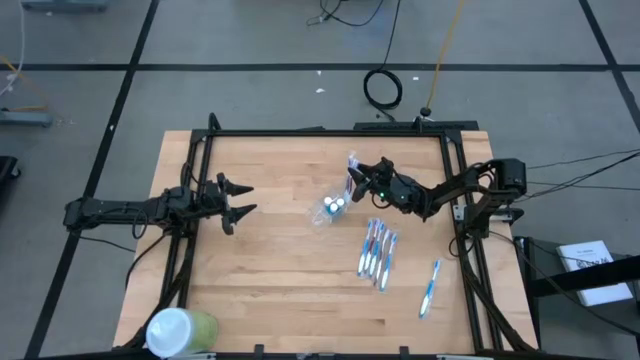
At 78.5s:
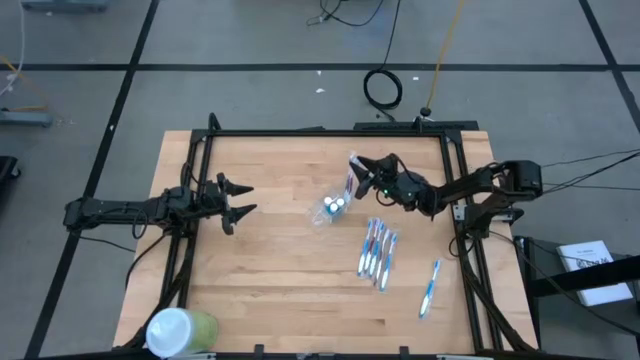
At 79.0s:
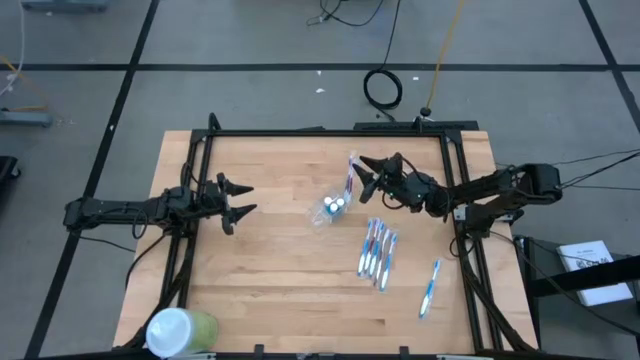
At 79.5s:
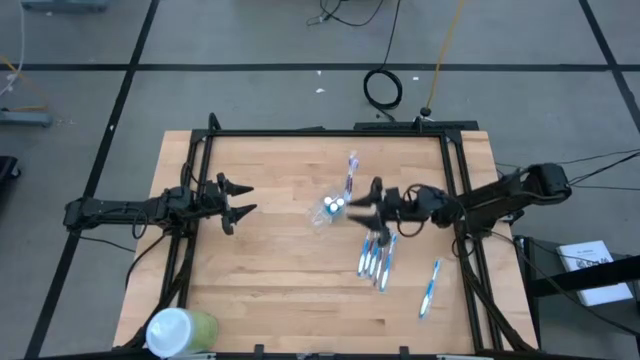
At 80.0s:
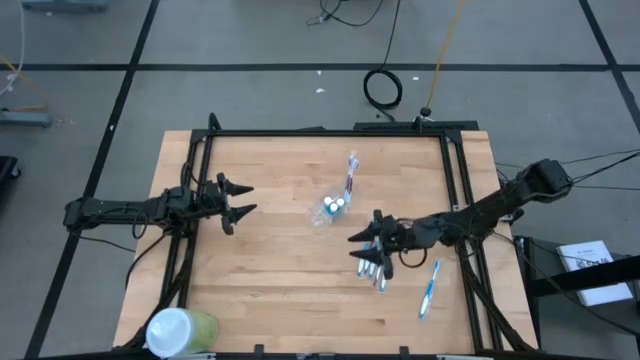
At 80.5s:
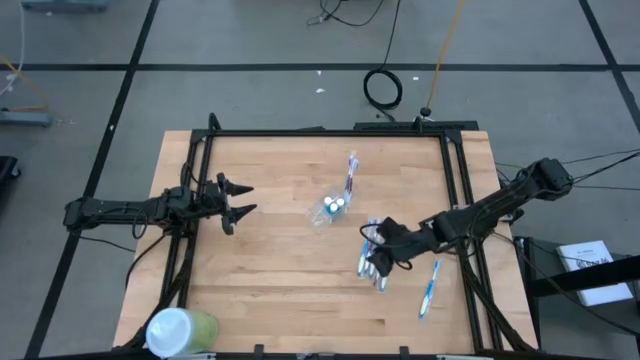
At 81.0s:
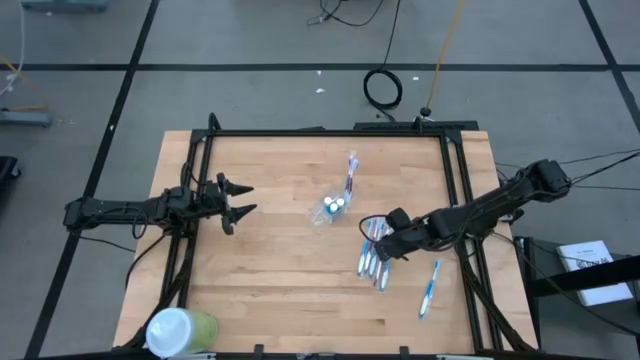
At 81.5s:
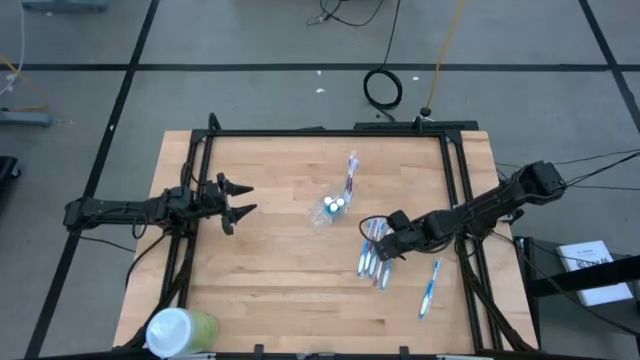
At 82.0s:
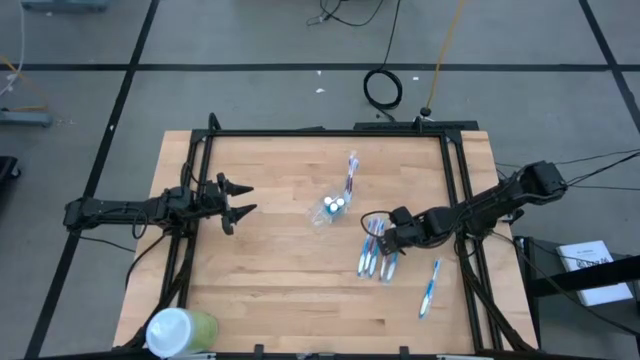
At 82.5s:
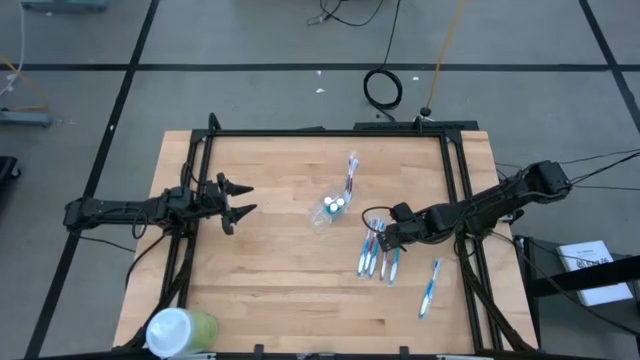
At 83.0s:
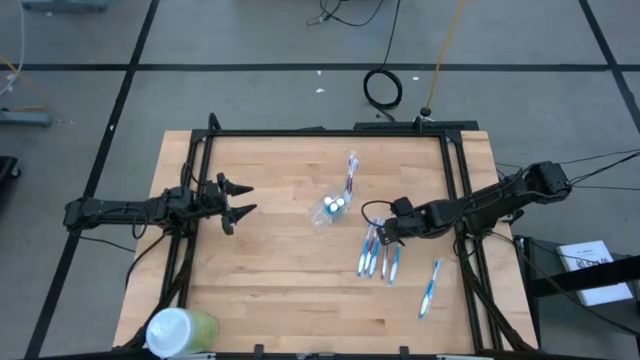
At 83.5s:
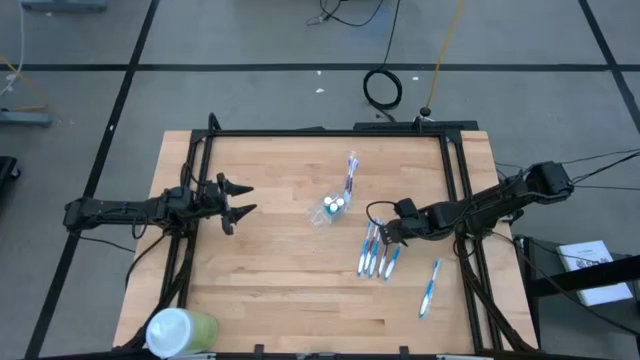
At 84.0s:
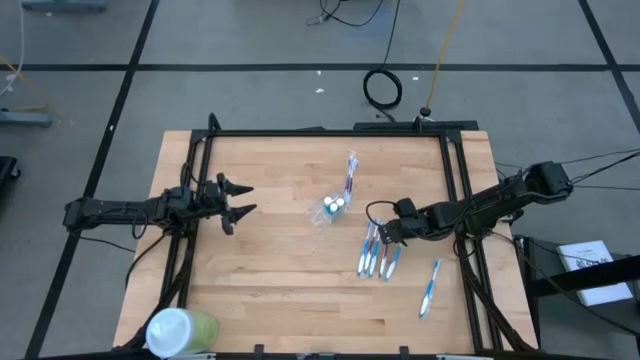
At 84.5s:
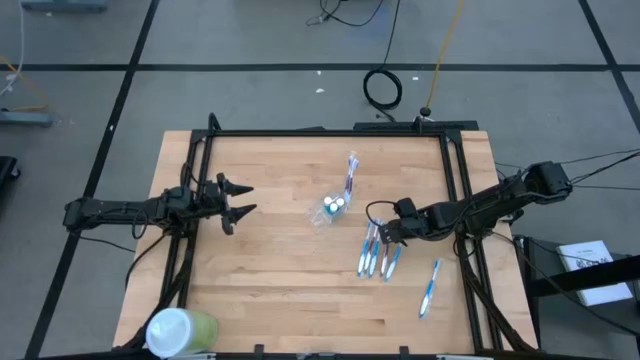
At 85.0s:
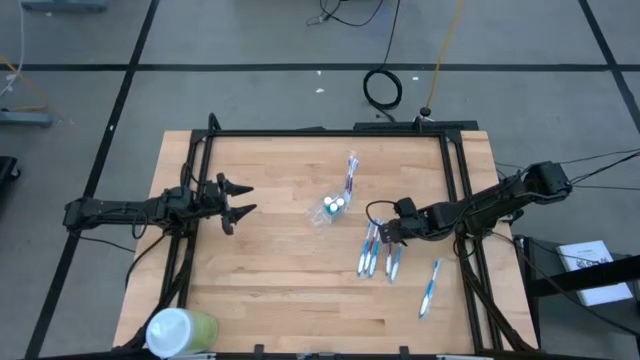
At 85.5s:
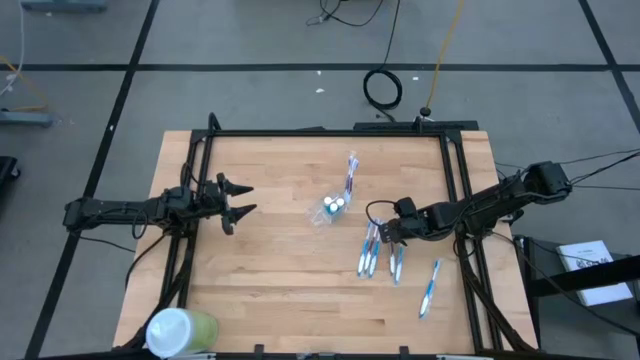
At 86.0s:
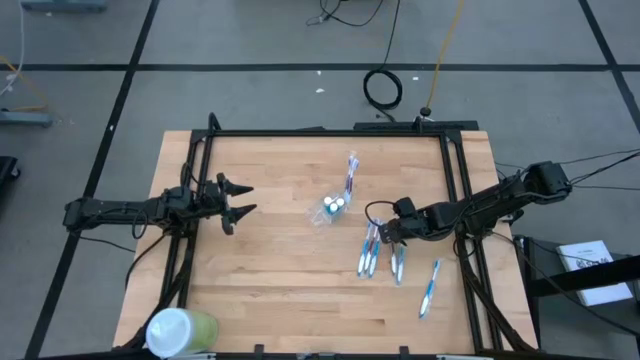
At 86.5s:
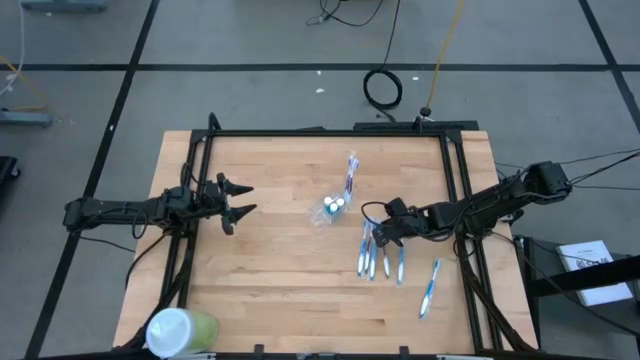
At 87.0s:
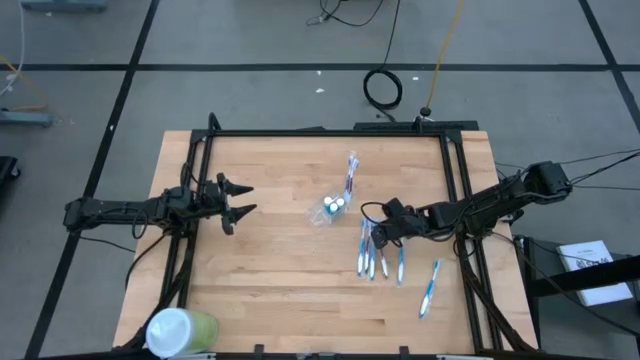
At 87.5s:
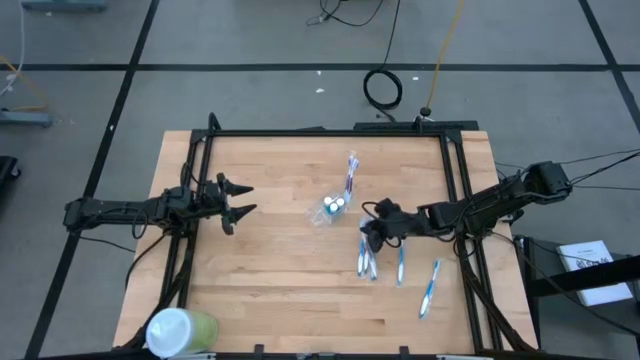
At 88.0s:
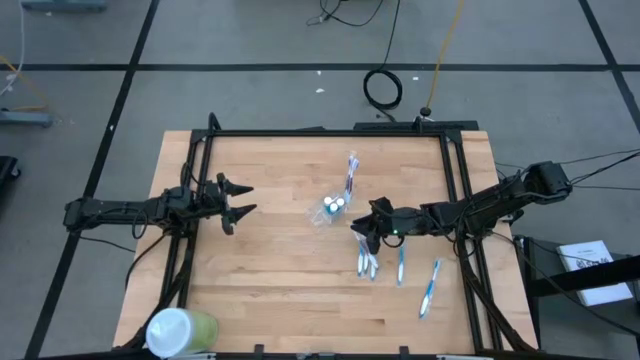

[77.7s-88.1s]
Task: Pick & Place toothbrushing station
Put the purple toothbrush into the transparent organizer

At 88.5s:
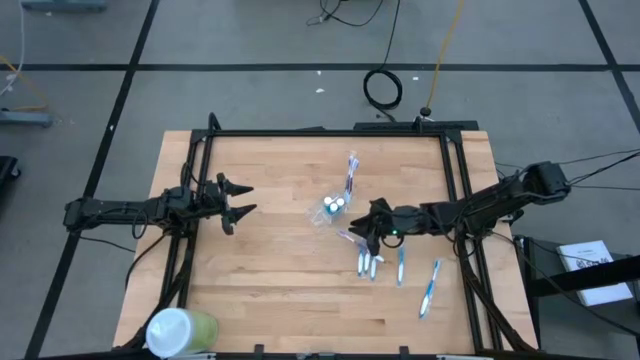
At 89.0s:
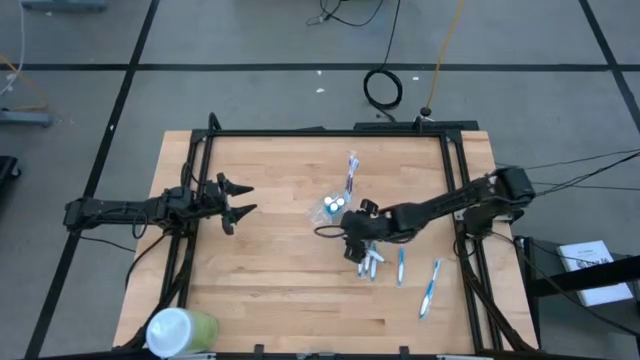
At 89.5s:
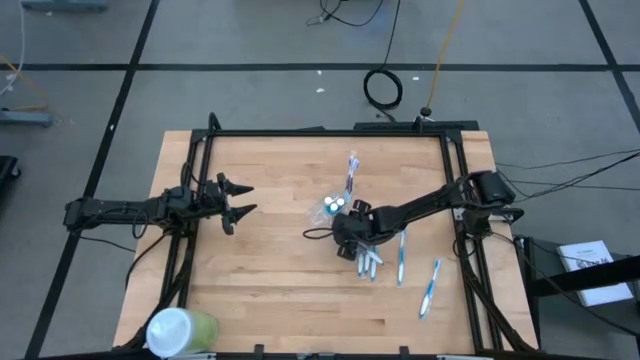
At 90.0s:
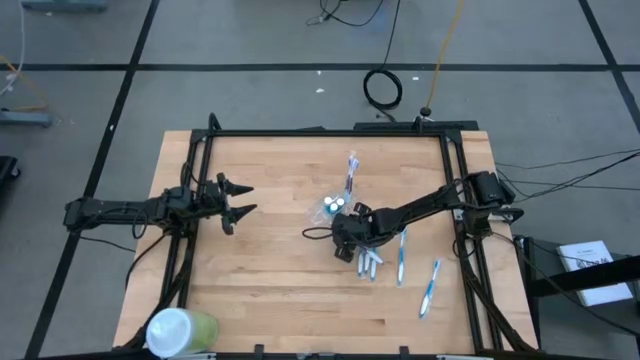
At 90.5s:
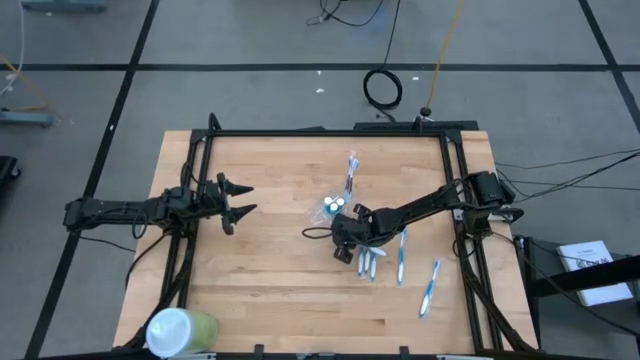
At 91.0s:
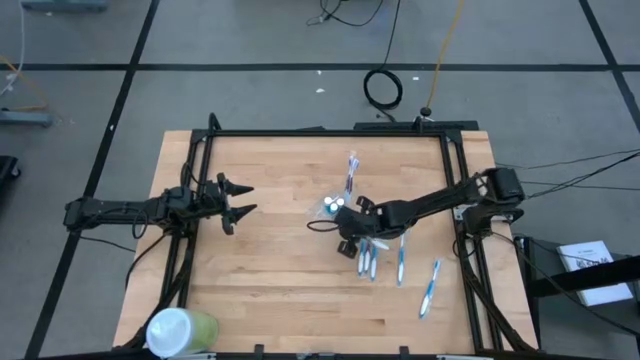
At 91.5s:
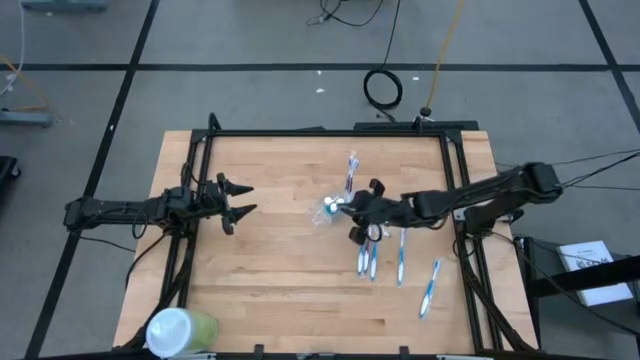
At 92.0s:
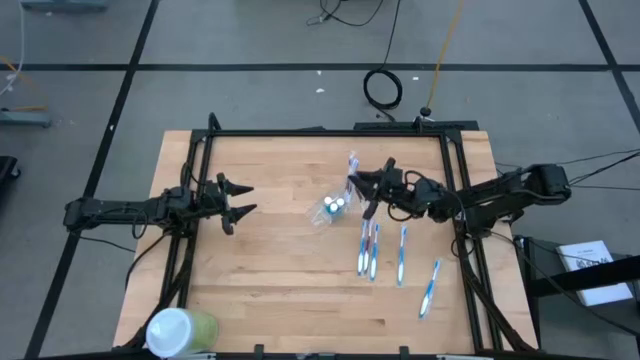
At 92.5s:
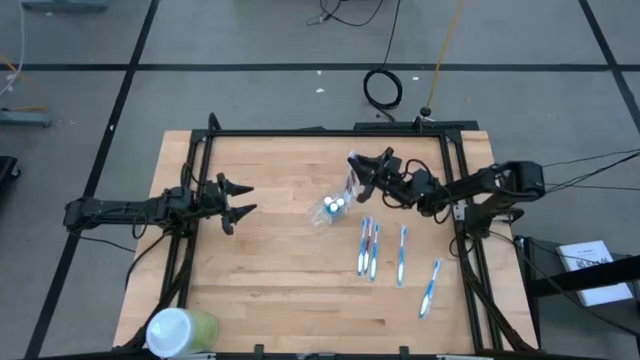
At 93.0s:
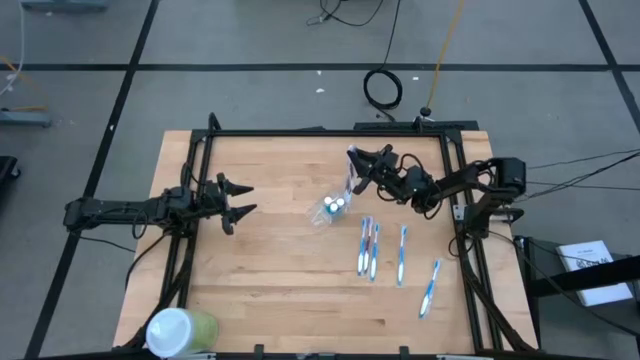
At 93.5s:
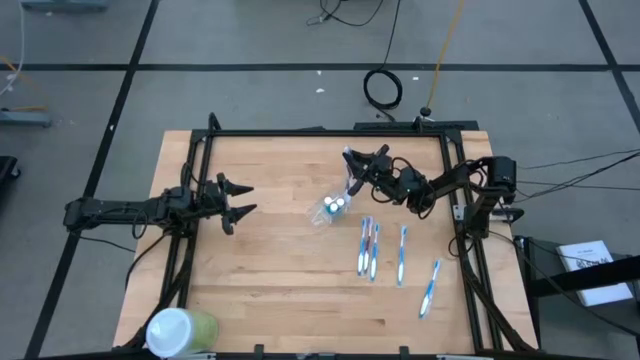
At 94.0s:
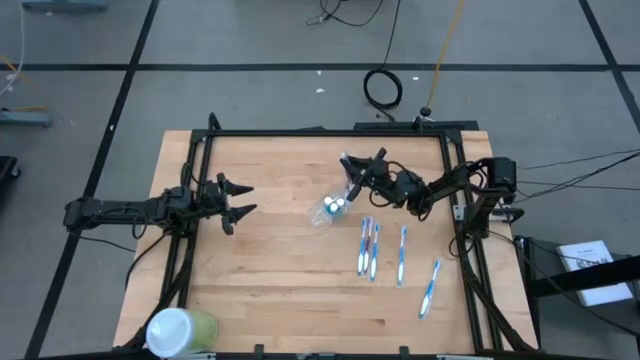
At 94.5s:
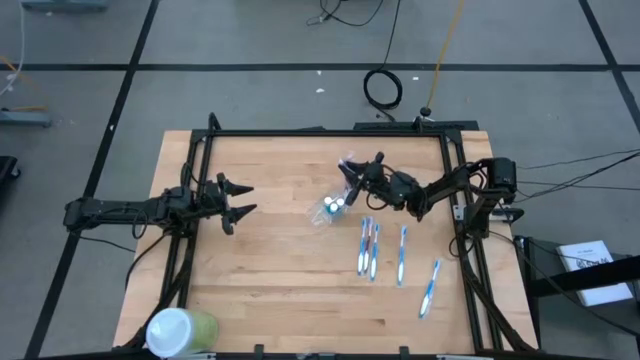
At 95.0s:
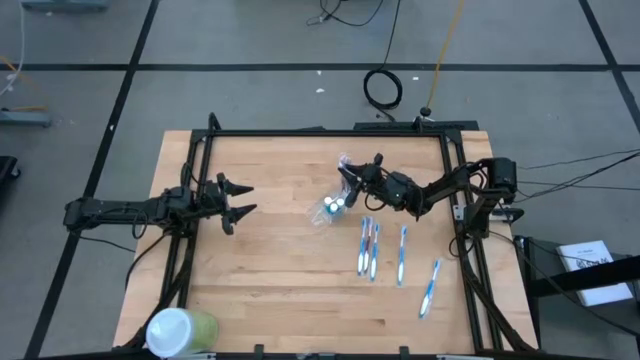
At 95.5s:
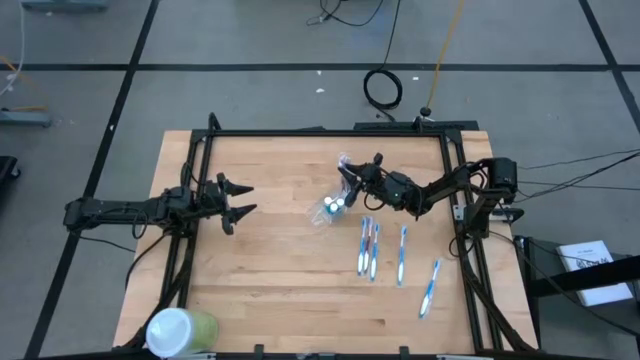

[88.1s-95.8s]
Put the purple toothbrush into the transparent organizer

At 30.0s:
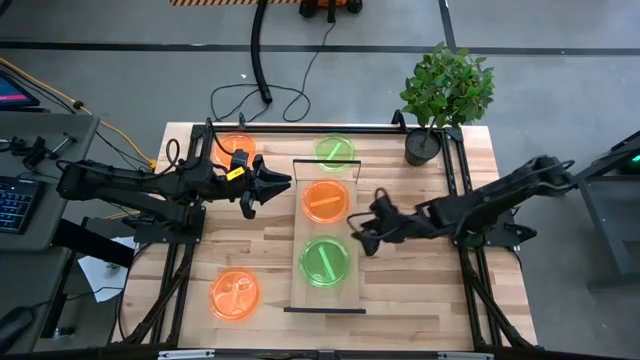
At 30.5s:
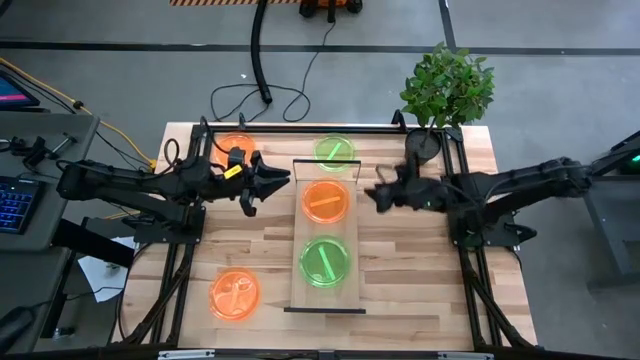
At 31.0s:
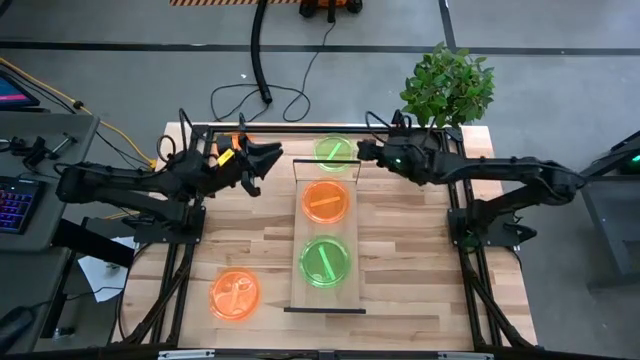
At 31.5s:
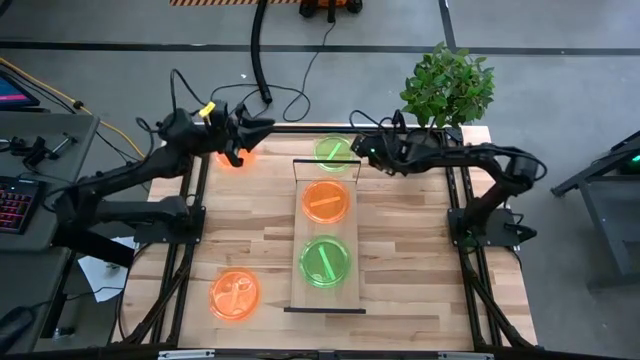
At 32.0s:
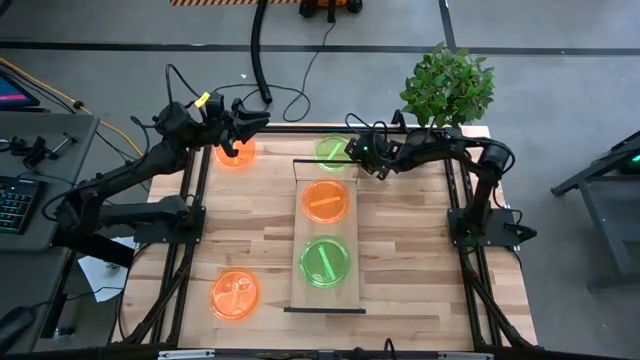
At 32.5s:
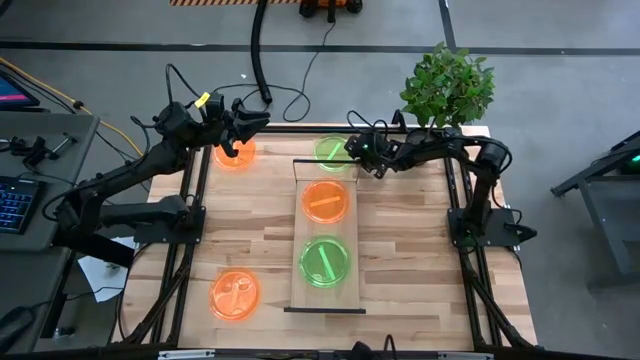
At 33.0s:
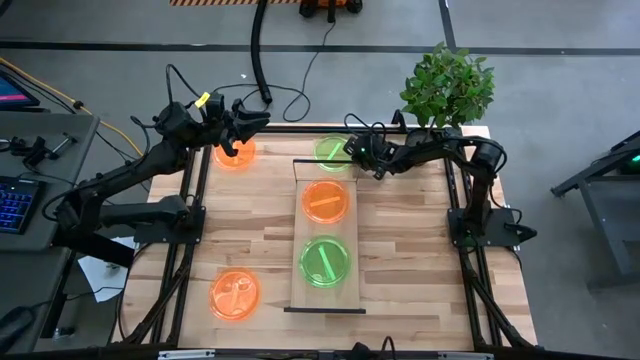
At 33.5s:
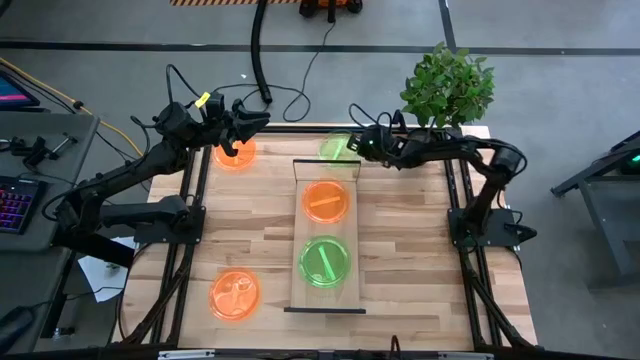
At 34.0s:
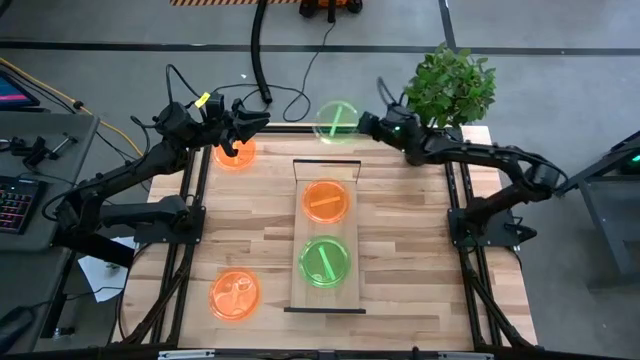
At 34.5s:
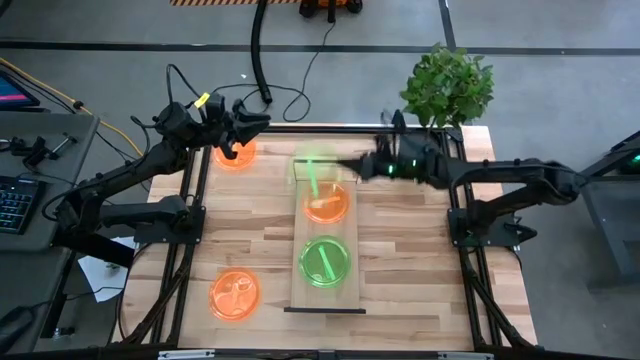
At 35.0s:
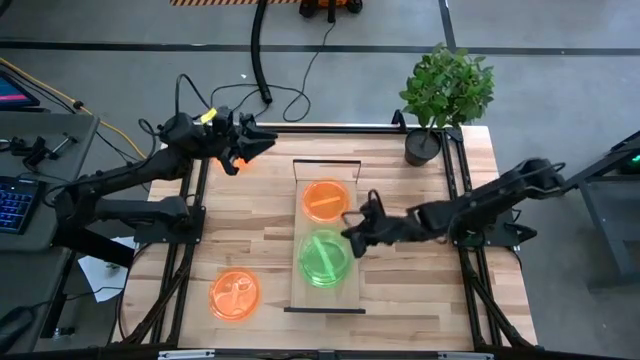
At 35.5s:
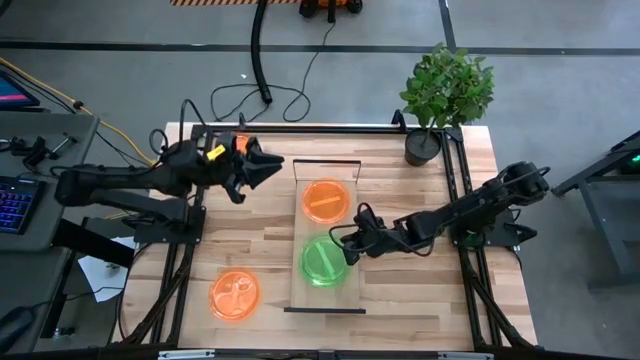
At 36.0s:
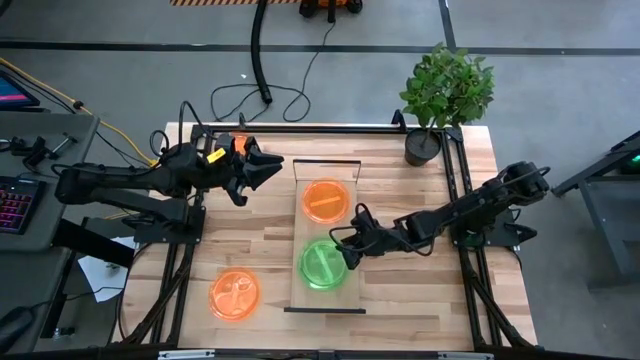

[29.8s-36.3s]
Task: Place and stack plates onto a shelf
Stack the green plate on top of the green plate
